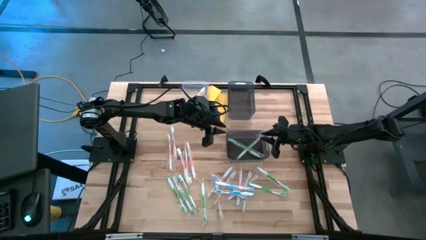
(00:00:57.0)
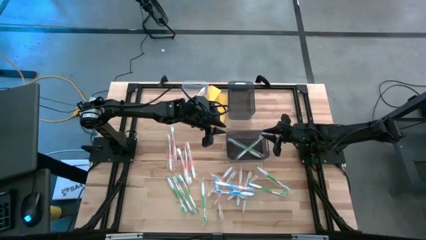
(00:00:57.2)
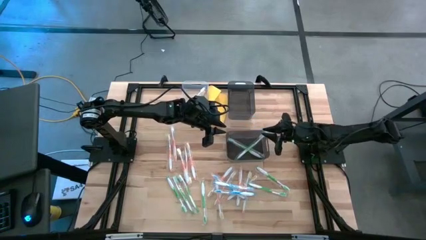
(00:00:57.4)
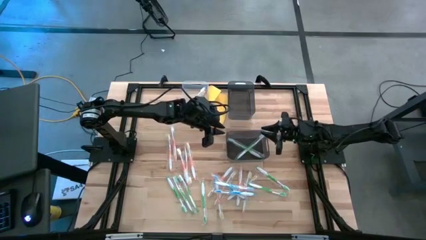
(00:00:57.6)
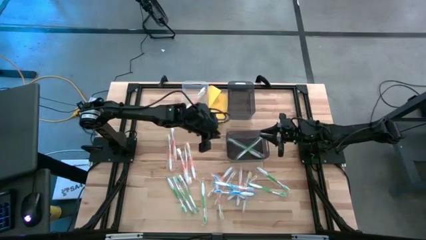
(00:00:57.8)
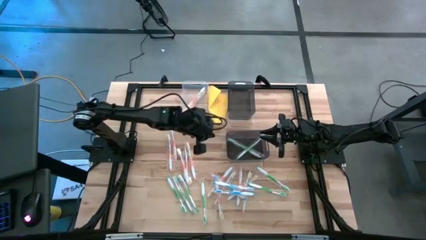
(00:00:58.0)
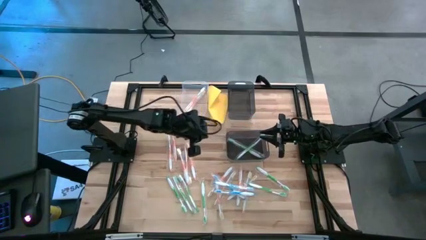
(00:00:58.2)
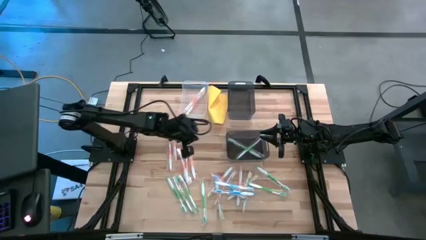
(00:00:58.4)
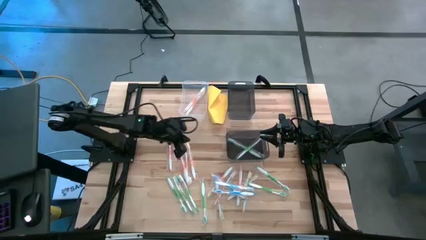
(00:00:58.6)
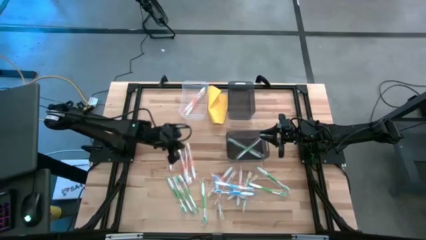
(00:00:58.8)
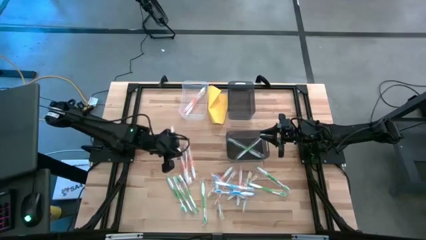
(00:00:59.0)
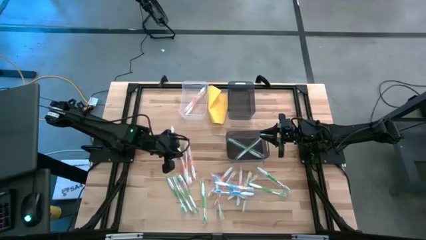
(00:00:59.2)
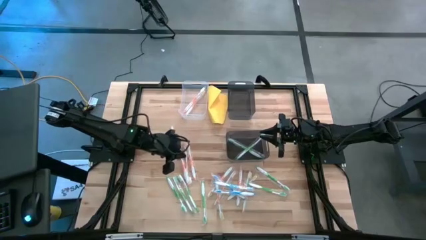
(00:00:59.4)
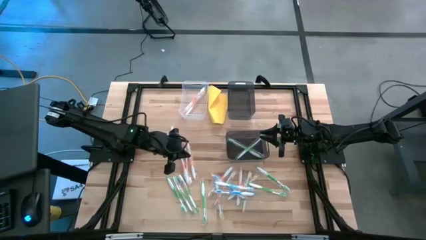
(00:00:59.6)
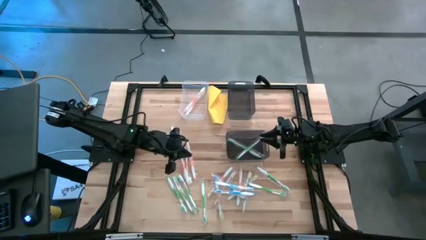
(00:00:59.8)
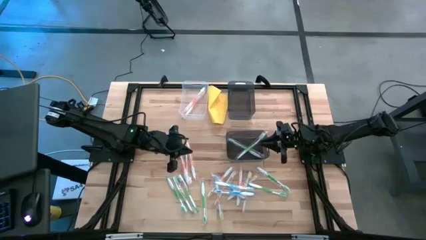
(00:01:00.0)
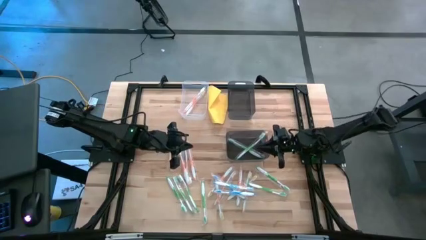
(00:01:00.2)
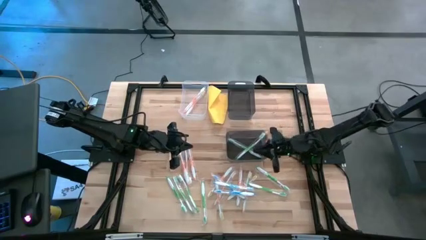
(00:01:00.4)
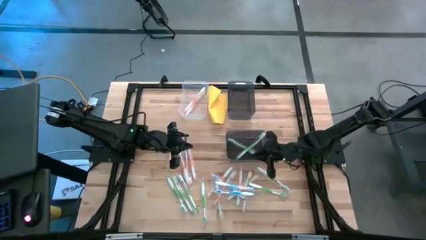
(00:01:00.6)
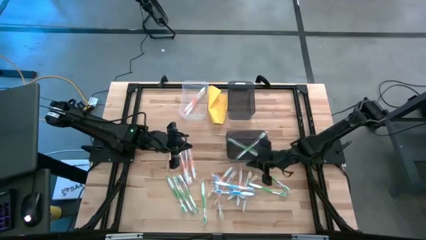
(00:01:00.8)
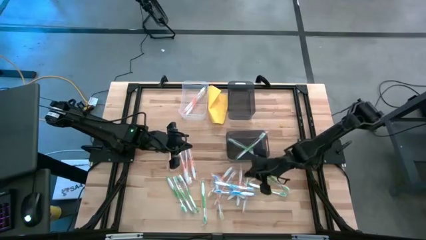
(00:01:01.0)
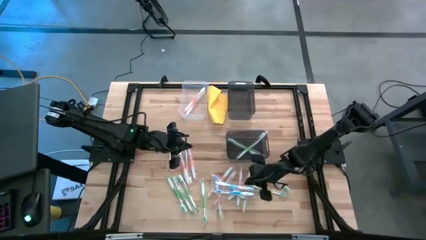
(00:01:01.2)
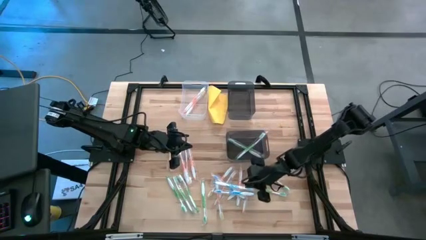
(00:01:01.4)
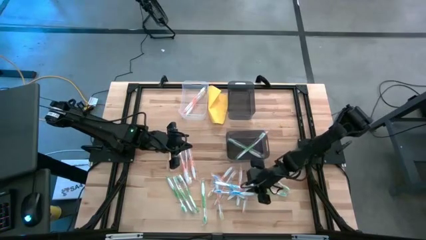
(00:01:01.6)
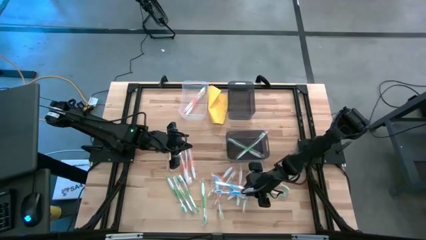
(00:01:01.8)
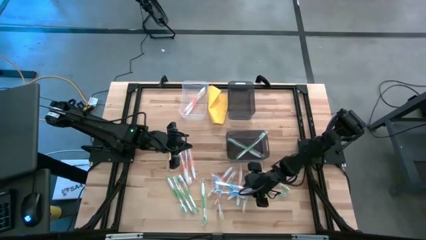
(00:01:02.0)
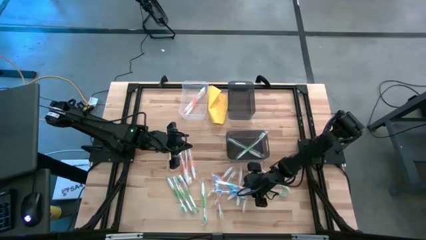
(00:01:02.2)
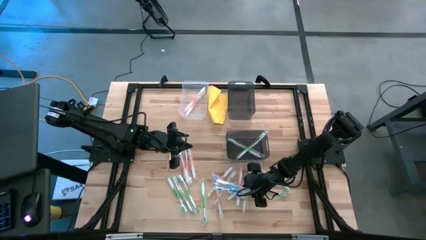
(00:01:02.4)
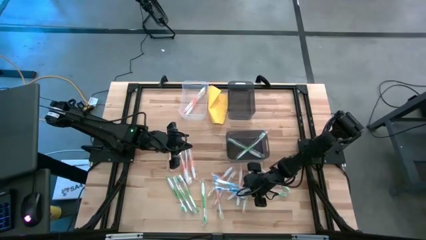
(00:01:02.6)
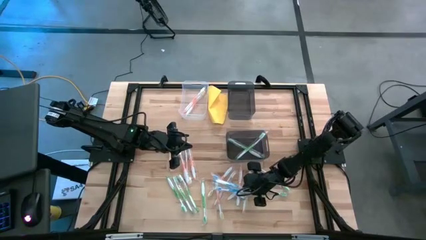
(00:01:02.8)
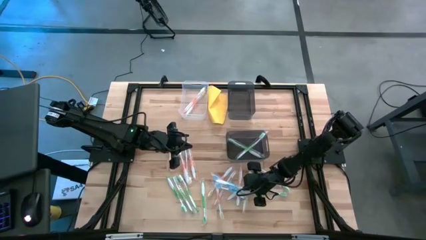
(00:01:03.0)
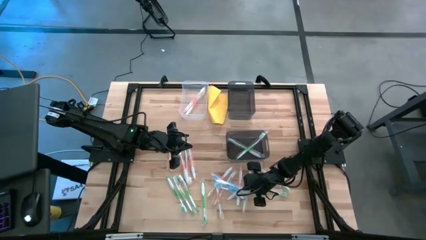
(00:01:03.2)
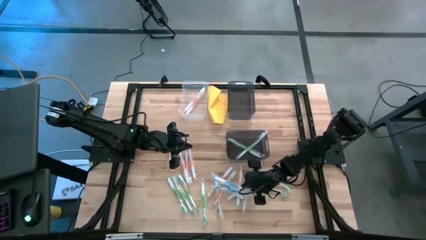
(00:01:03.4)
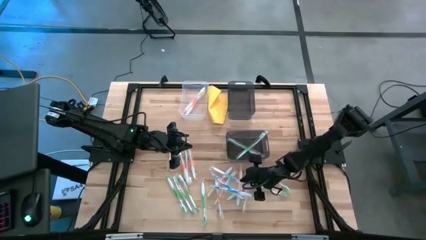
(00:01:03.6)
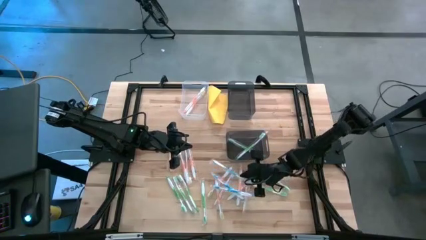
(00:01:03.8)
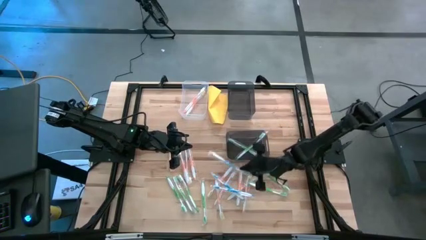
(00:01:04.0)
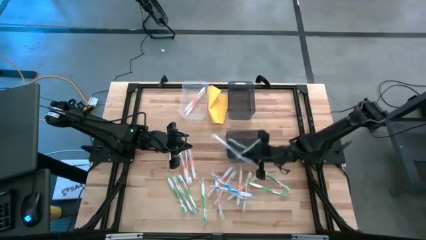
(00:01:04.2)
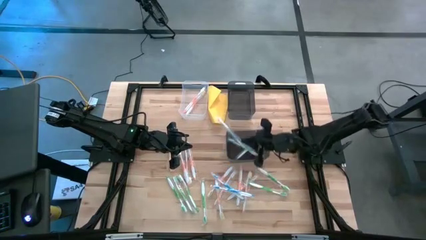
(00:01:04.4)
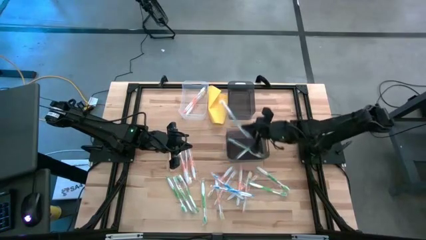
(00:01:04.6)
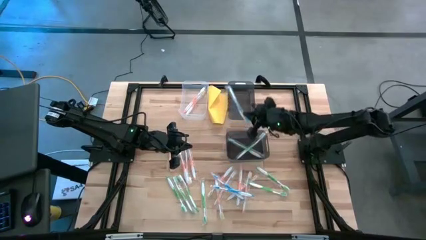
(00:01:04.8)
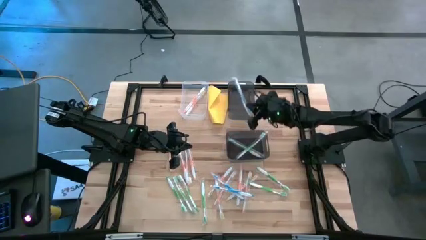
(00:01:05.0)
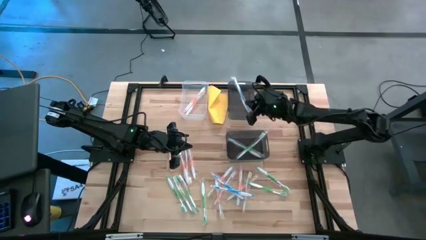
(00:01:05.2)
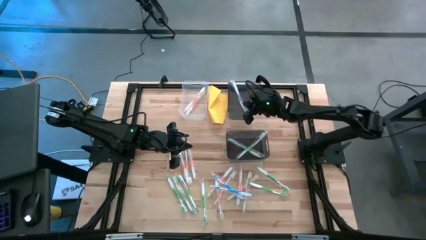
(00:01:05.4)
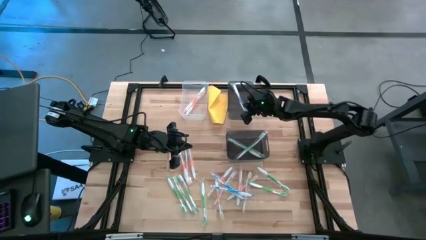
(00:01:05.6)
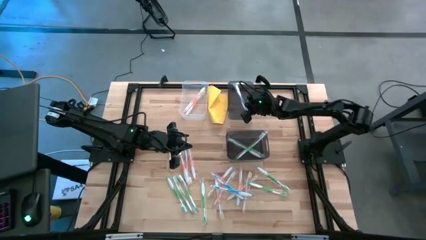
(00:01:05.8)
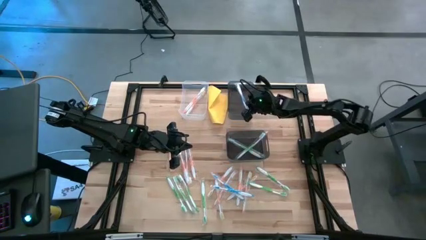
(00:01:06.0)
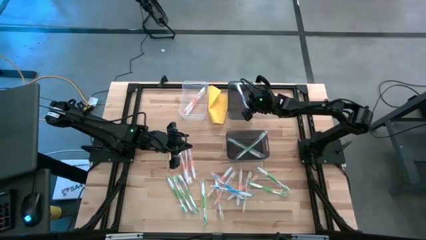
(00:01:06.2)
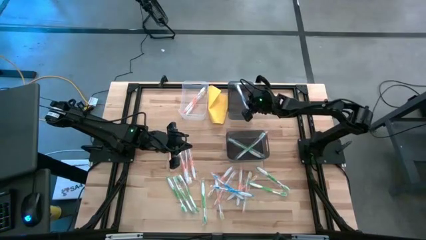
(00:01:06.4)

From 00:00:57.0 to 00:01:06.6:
Task: Pick & Place Toothbrushes
Put the blue toothbrush into the top black transparent bin

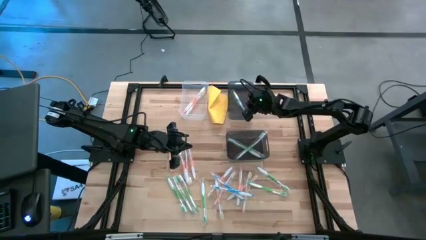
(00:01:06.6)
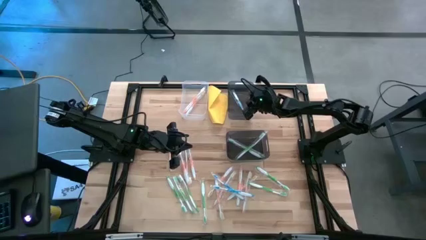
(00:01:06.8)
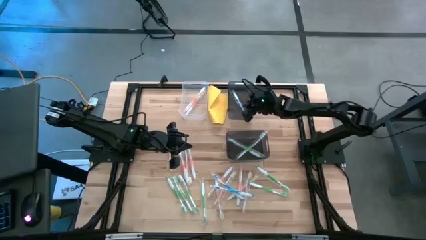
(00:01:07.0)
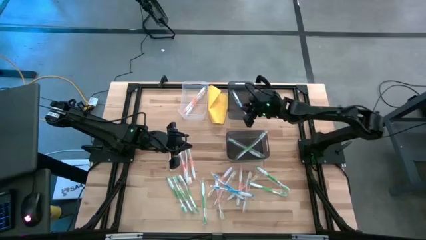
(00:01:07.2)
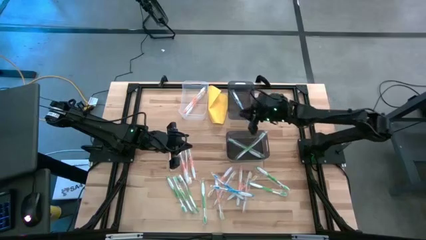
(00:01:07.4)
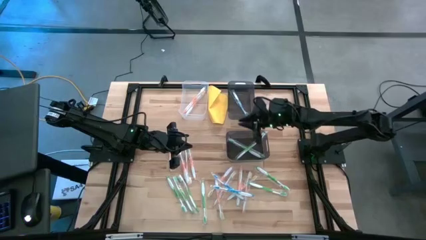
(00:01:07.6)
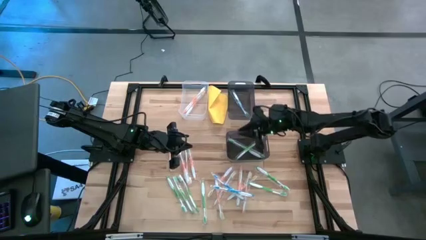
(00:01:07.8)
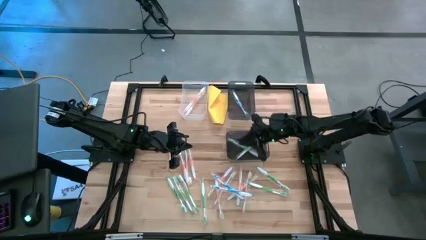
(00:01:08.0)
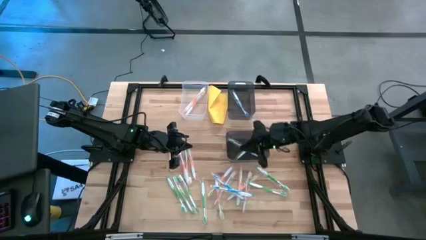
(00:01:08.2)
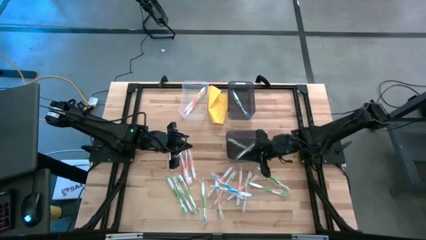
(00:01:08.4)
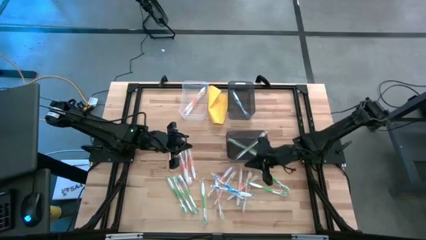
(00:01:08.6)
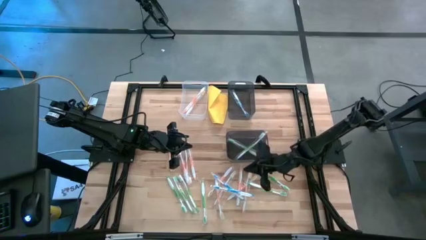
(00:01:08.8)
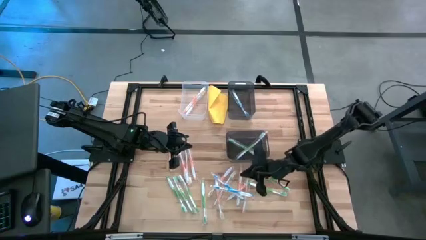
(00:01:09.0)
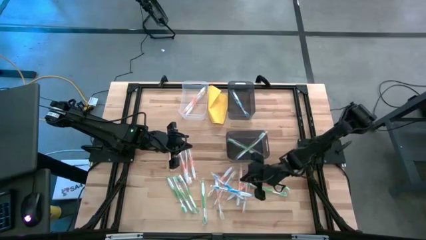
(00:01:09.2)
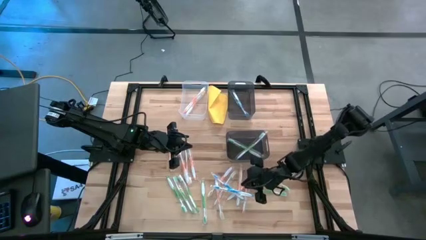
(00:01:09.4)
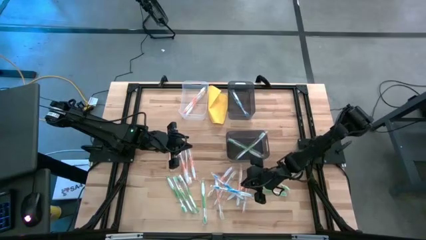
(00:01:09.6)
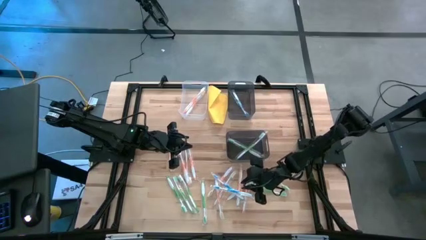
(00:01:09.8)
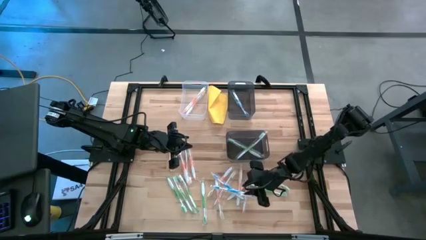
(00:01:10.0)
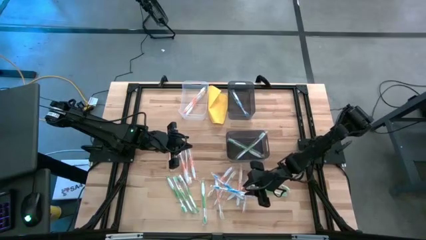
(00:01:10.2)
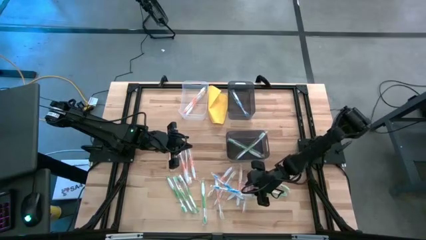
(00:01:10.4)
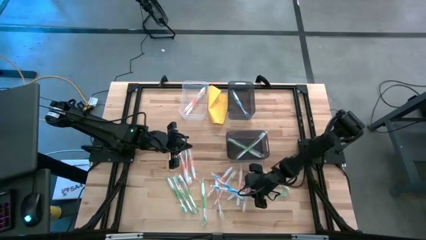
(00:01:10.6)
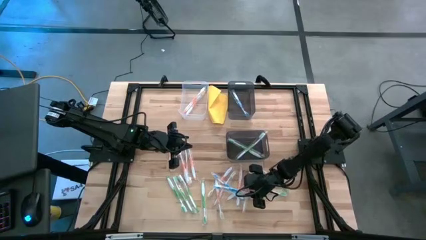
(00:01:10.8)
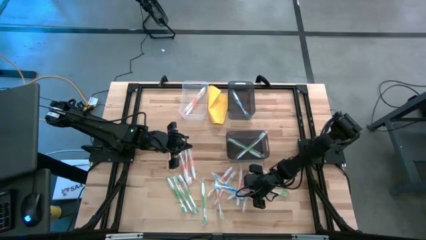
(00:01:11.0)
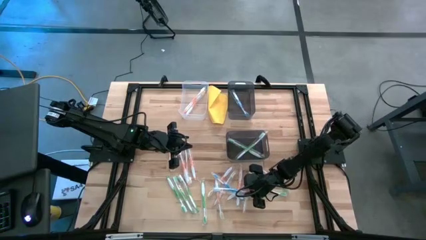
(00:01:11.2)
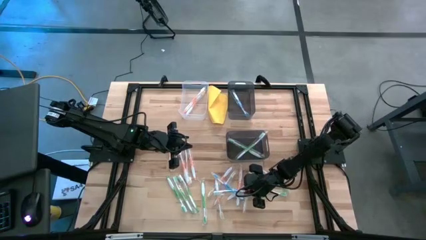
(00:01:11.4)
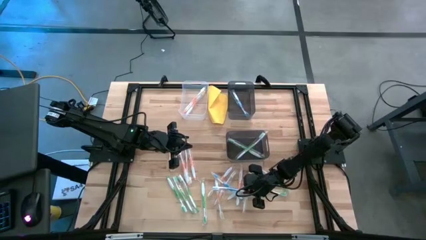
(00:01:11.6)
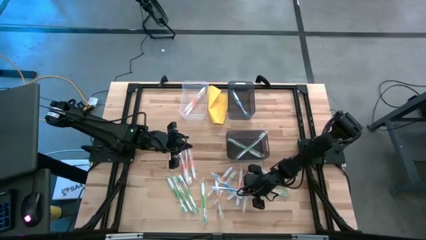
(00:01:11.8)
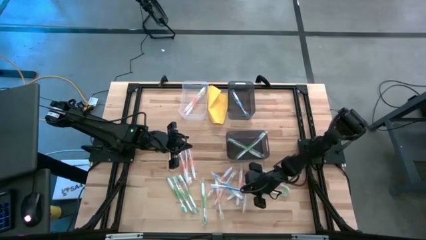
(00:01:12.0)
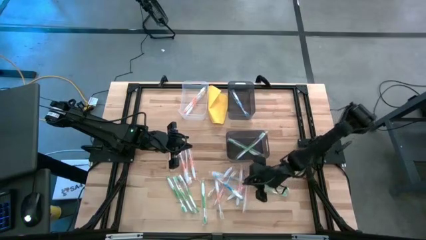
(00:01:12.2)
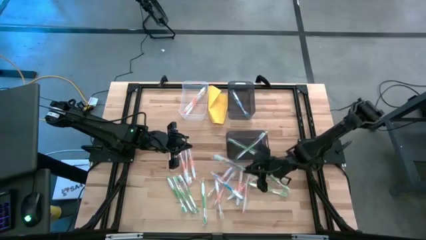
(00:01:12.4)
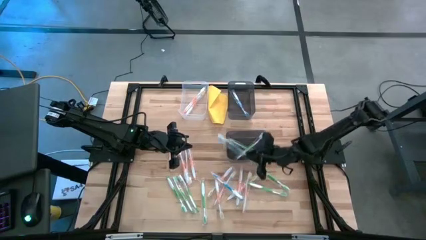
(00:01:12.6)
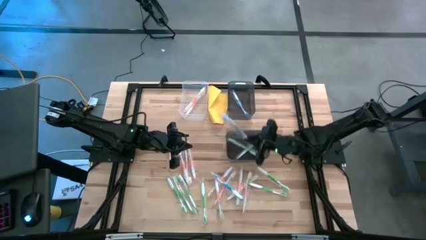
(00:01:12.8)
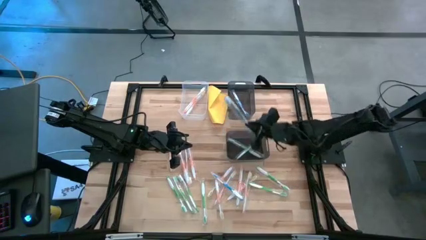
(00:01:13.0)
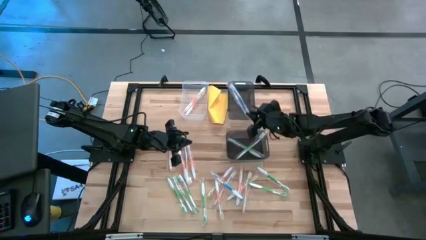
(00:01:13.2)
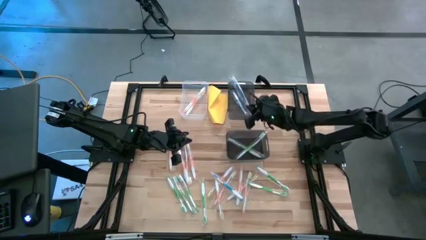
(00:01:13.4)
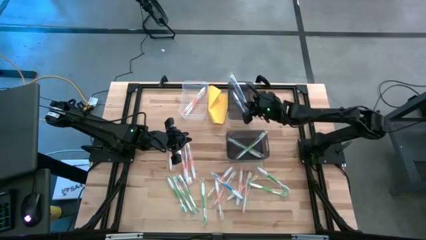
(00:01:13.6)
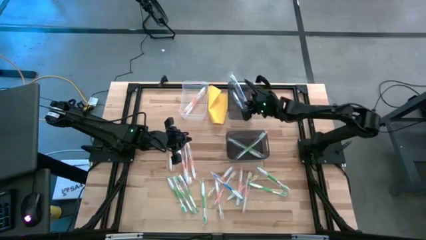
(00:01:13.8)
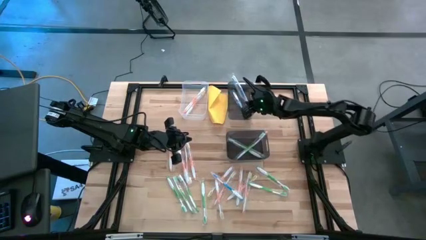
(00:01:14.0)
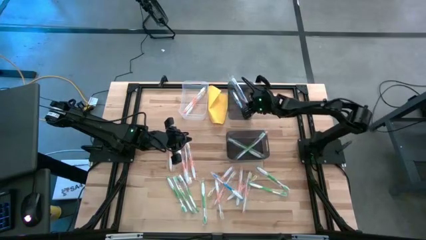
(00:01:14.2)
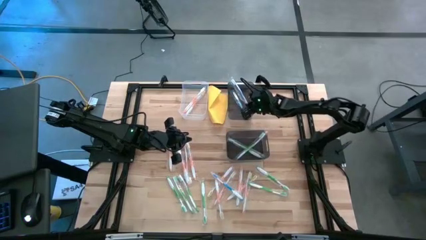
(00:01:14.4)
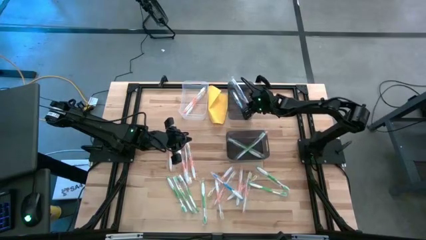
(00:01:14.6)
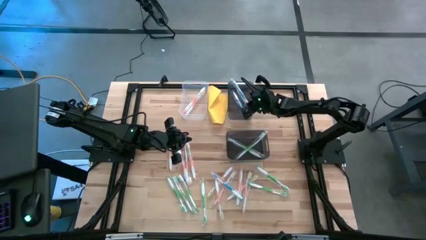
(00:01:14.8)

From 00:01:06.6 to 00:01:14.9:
Put the blue toothbrush into the top black transparent bin
